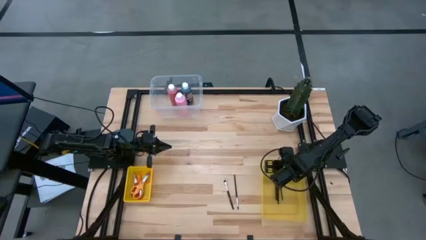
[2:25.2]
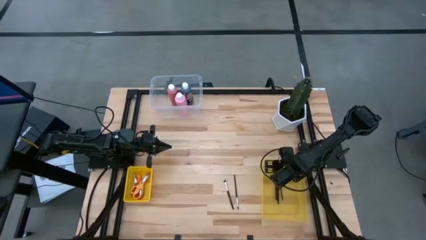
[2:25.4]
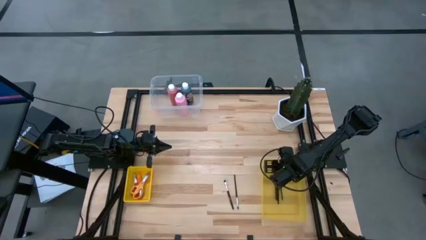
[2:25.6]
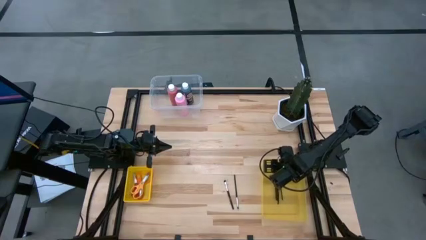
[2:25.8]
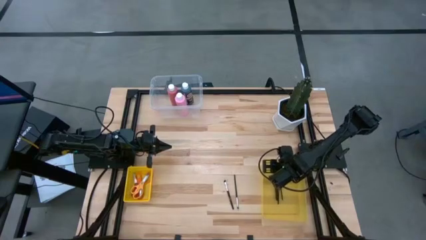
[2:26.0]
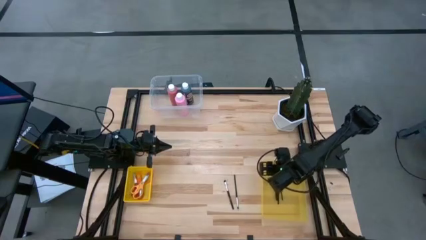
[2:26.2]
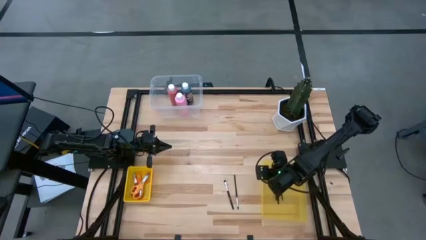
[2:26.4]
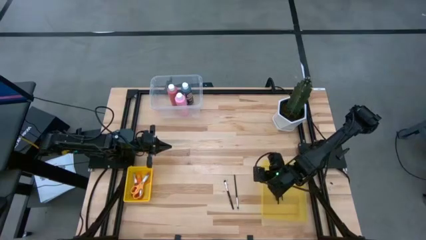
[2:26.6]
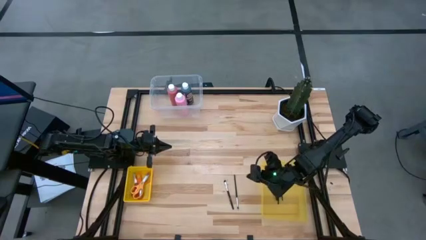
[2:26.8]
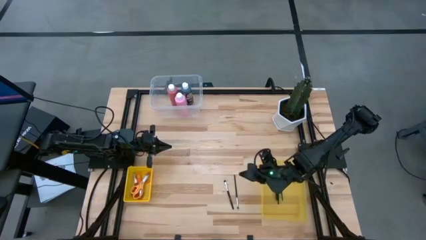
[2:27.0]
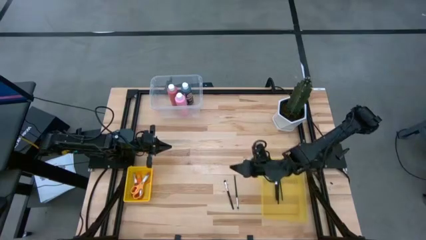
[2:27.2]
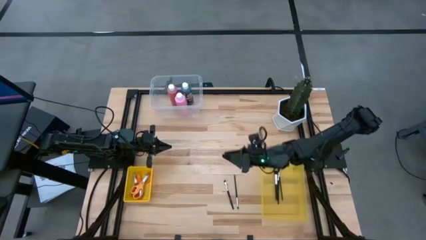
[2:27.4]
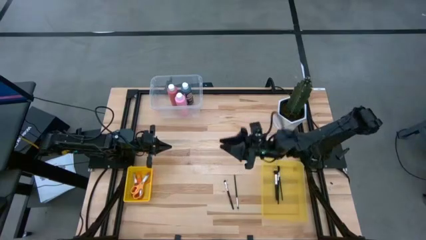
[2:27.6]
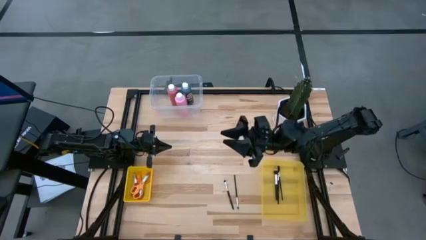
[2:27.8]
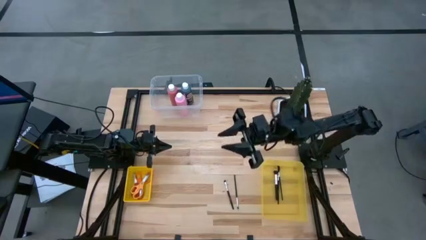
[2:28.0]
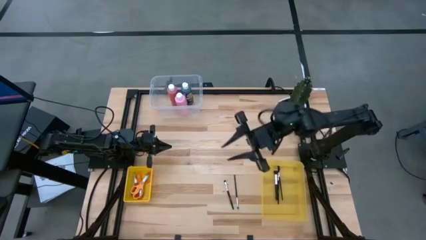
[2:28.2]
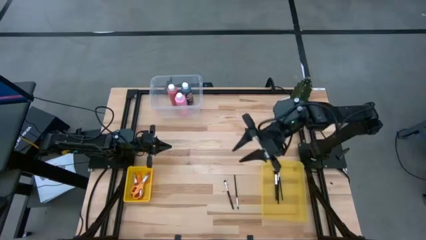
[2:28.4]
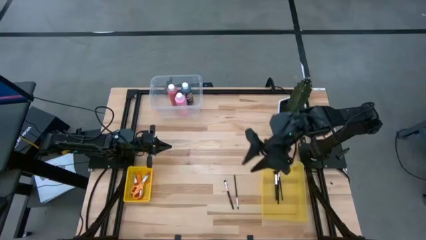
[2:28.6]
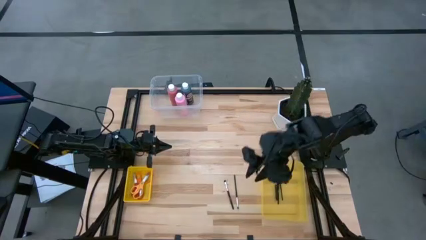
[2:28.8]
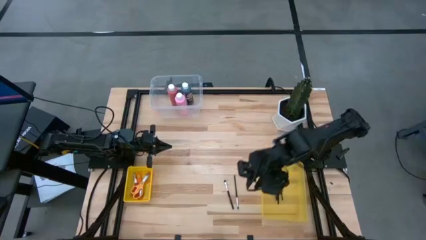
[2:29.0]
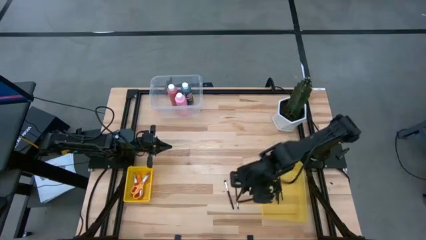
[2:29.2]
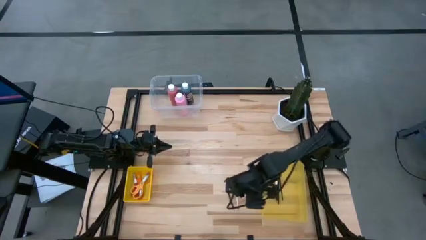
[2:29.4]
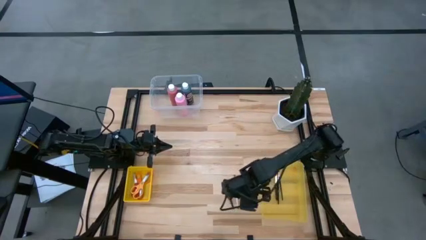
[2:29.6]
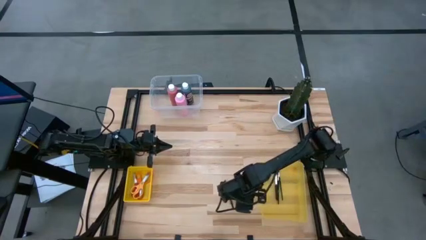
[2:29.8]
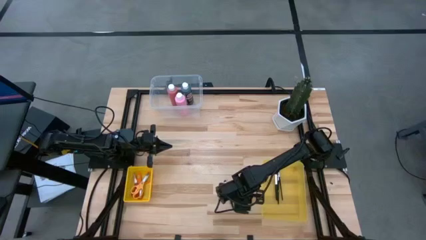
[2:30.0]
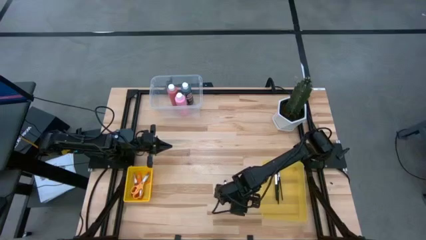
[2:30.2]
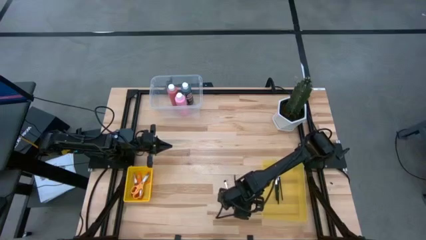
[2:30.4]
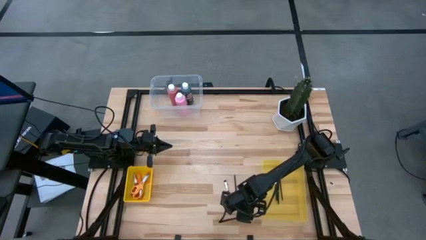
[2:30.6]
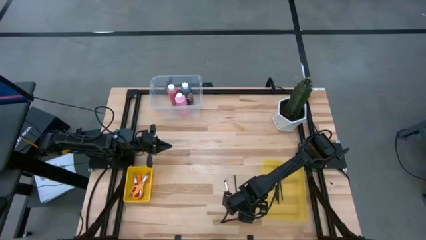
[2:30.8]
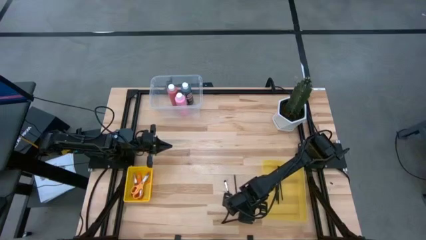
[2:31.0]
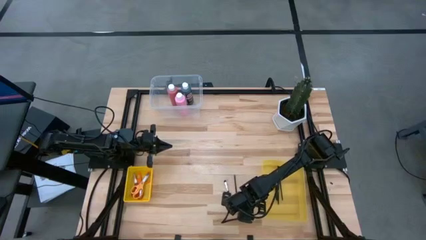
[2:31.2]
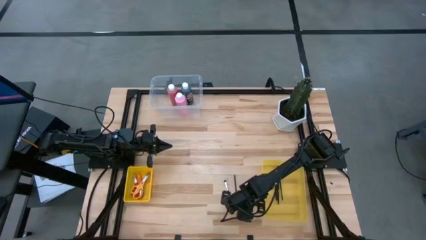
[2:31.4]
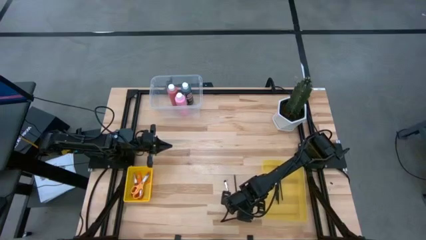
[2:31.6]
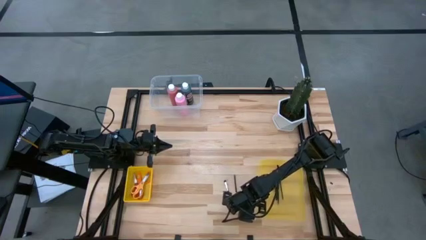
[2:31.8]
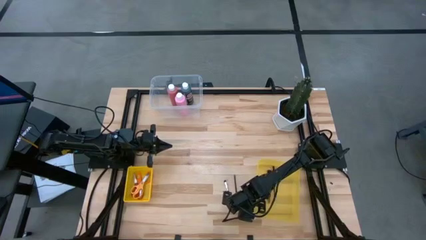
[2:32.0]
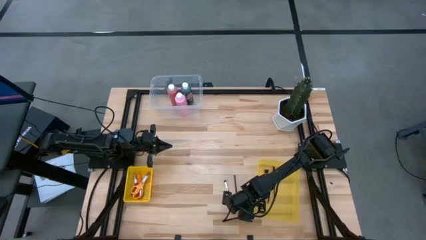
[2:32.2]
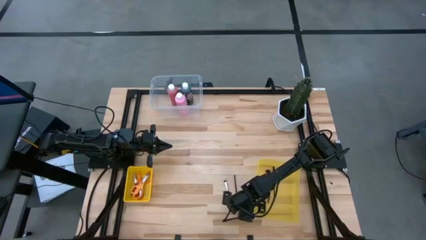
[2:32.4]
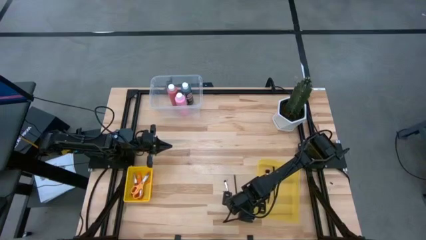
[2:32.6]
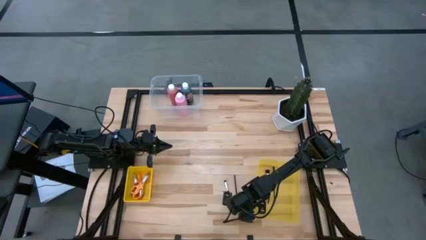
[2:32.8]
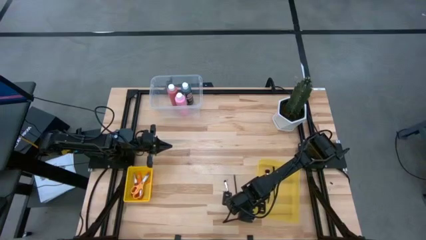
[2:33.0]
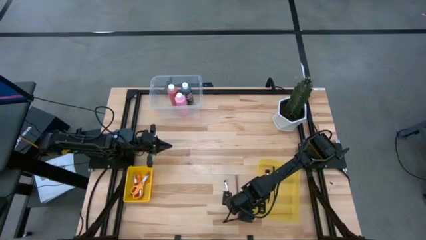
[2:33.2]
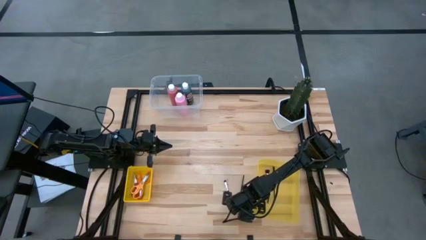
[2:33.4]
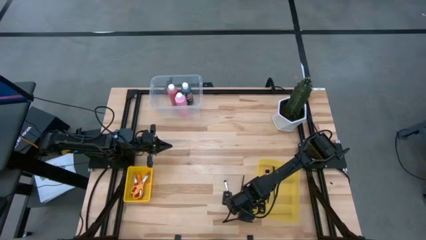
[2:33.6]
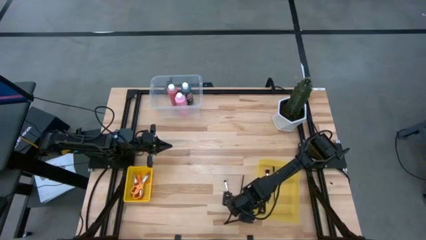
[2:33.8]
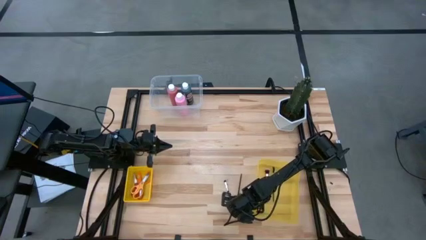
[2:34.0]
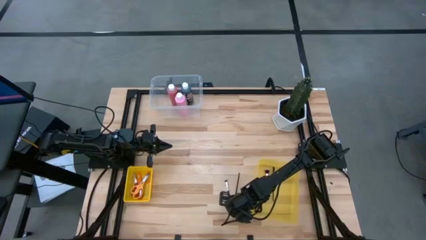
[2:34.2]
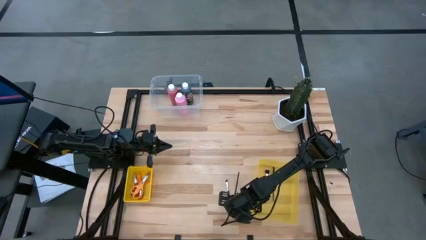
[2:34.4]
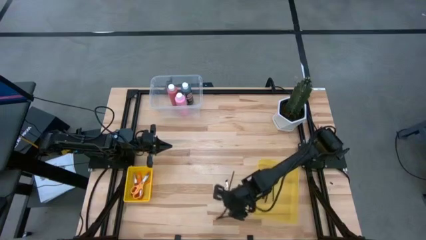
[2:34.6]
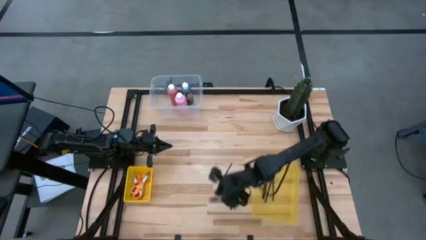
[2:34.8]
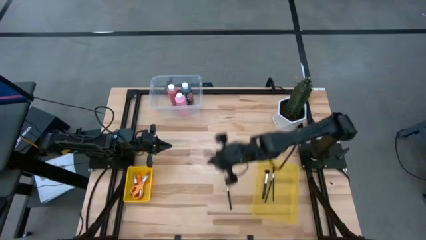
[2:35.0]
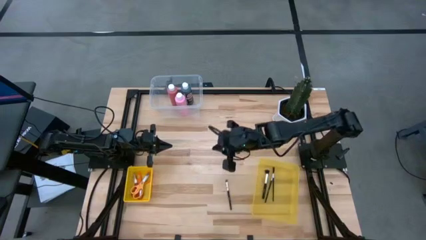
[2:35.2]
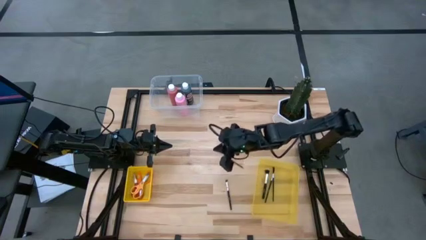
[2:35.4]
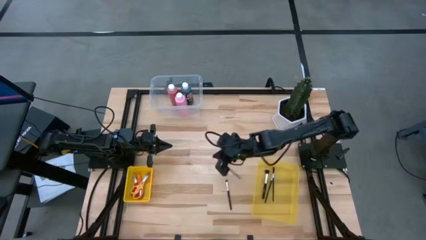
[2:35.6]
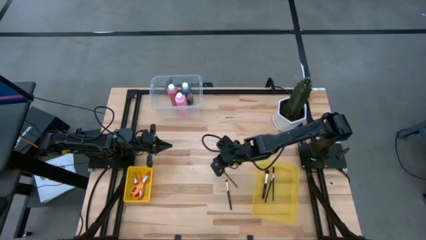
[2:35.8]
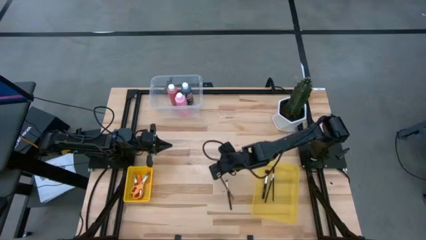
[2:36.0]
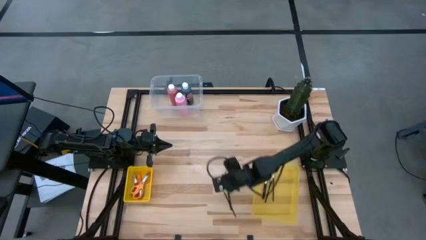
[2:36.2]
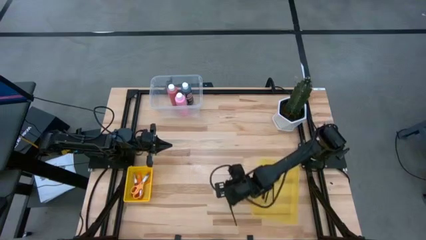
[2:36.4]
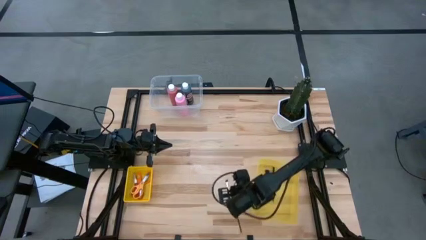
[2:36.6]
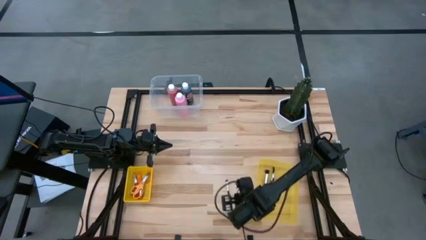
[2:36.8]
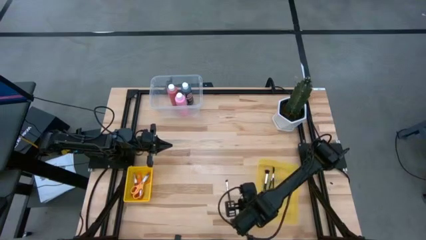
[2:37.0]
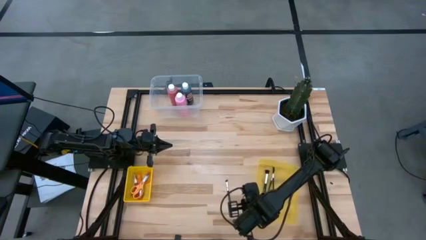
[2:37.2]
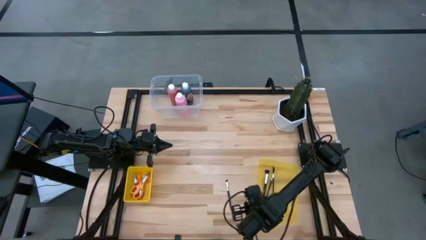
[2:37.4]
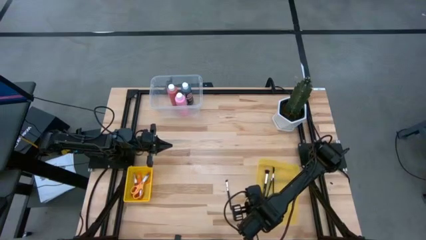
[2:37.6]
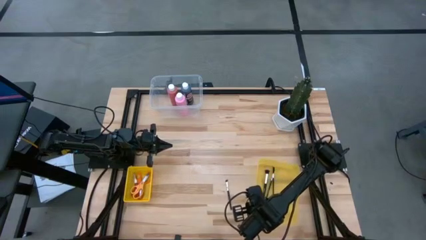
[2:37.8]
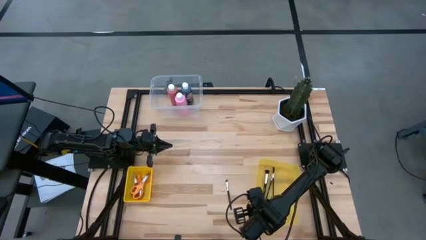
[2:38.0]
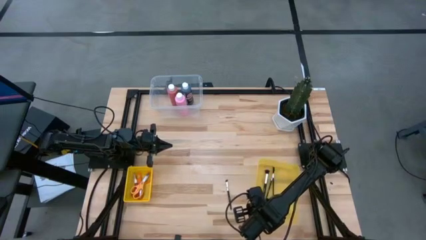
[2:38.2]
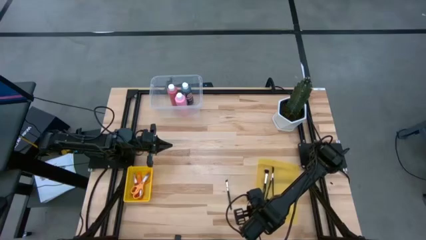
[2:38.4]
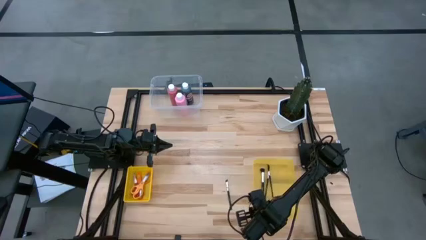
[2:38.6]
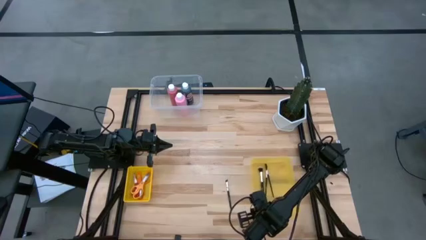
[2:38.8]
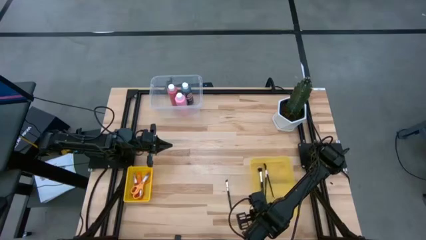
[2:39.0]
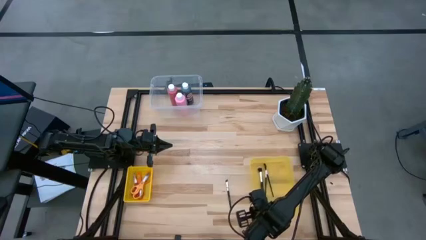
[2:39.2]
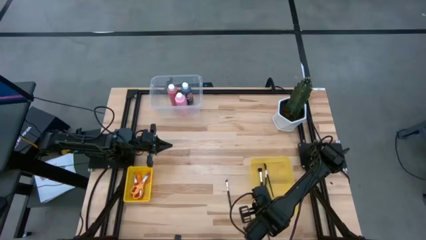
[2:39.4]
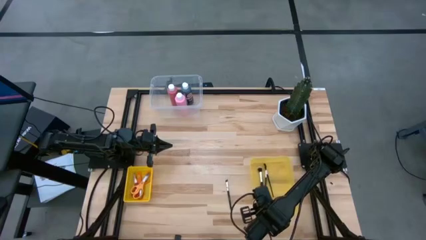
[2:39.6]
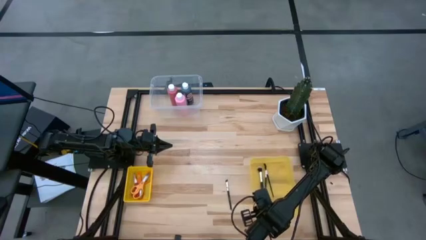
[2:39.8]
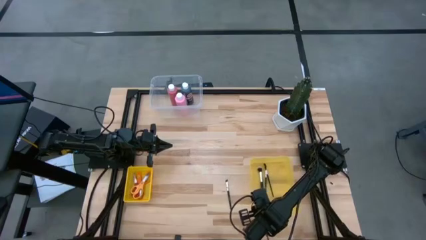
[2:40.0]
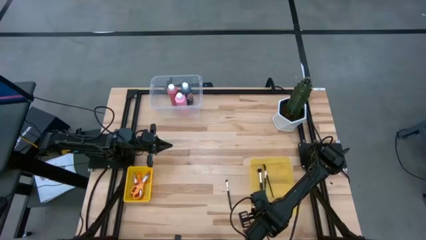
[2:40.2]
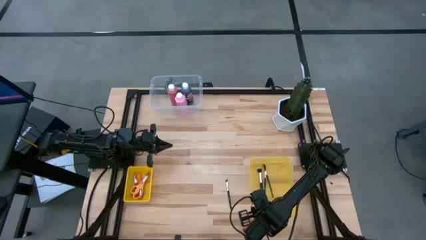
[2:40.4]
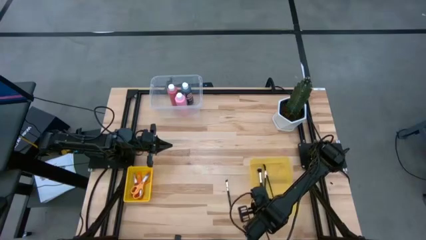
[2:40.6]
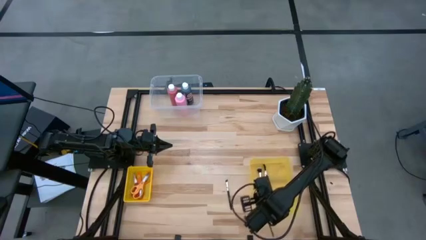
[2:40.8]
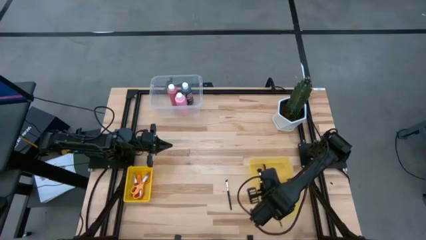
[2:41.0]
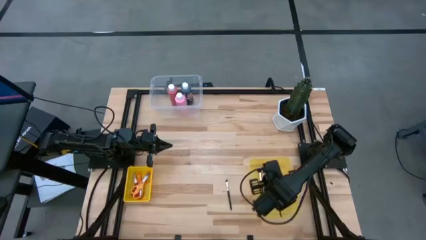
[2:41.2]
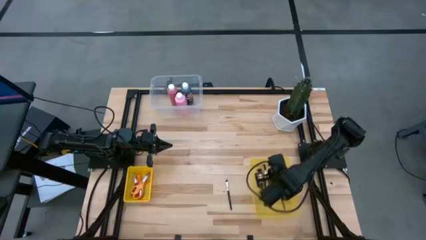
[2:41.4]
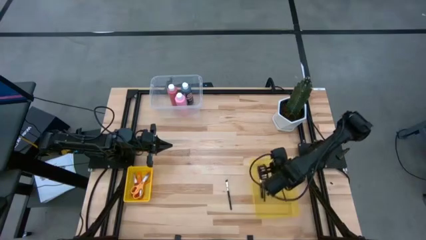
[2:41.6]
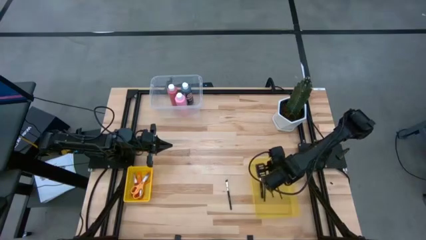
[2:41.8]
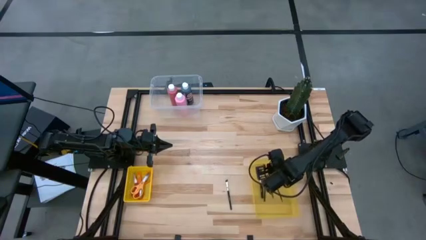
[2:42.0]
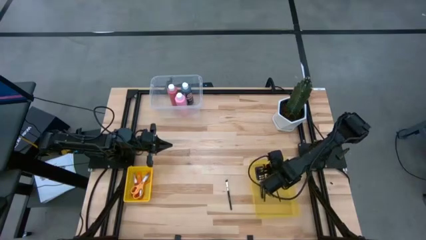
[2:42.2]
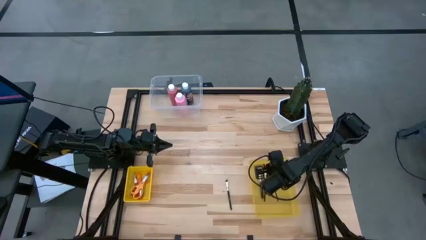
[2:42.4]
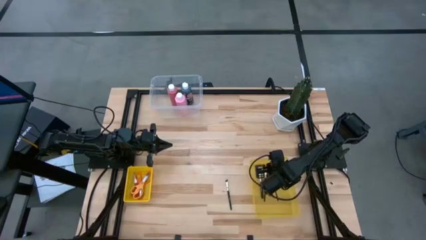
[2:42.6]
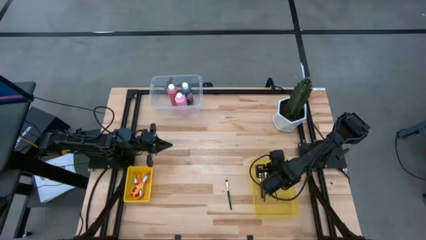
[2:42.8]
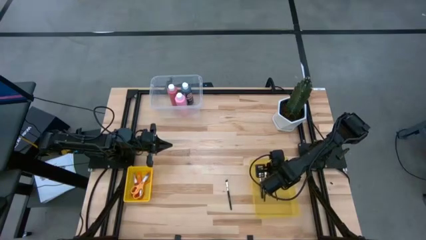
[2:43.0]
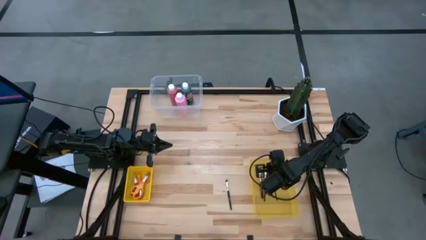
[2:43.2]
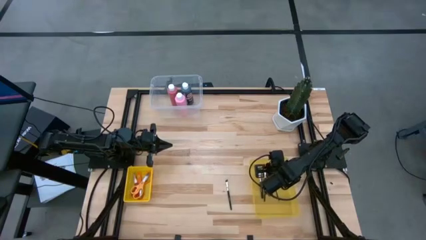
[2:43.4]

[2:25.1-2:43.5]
Task: Pick & Place Paint Supplies
Put the foundation brush into the yellow bin
